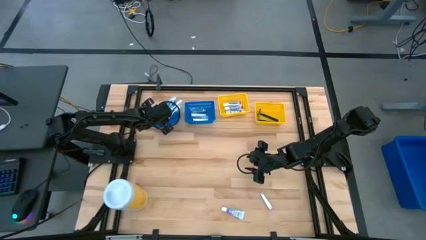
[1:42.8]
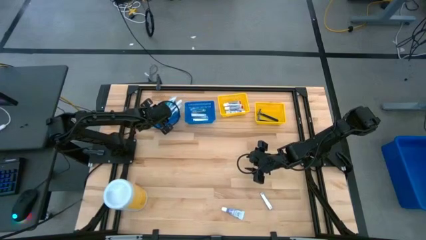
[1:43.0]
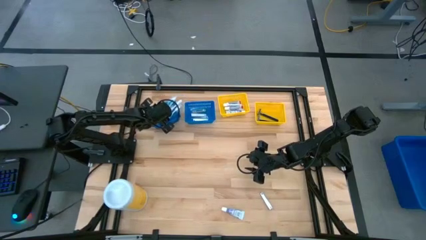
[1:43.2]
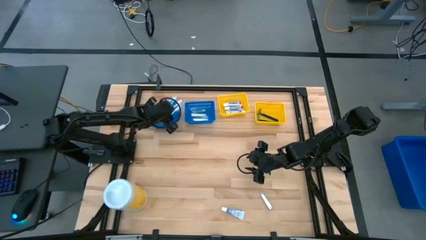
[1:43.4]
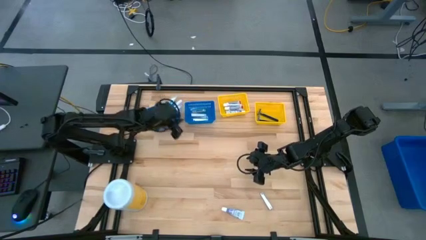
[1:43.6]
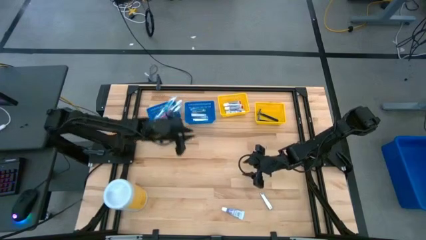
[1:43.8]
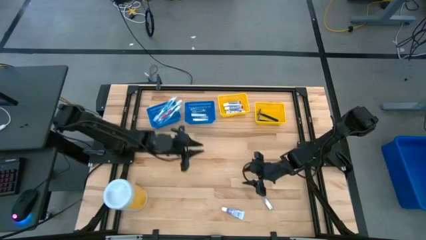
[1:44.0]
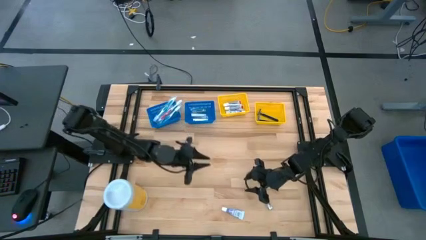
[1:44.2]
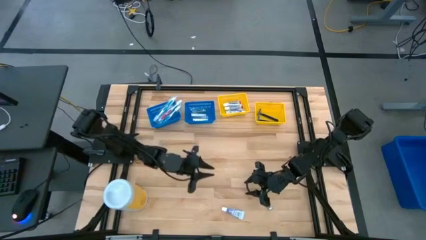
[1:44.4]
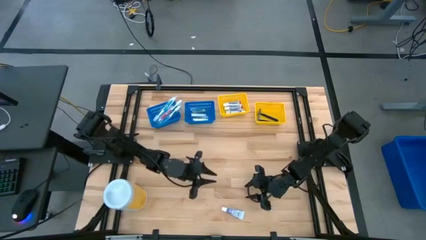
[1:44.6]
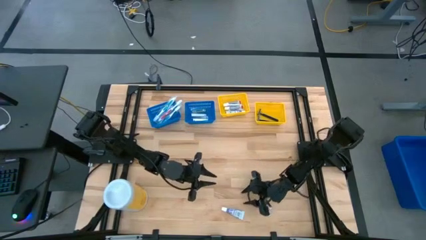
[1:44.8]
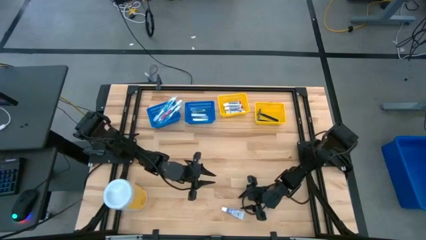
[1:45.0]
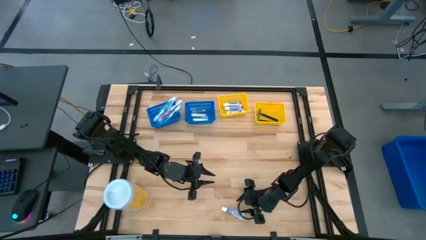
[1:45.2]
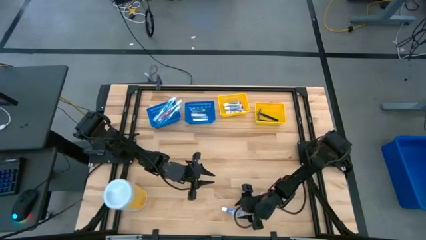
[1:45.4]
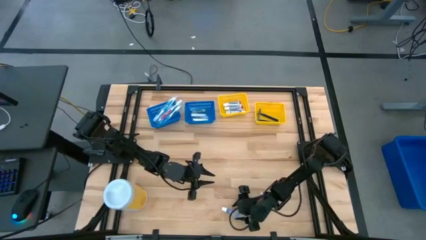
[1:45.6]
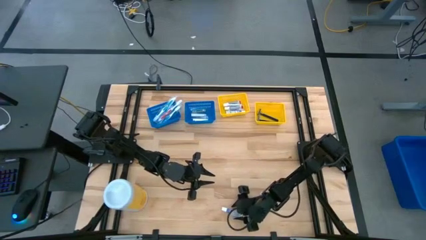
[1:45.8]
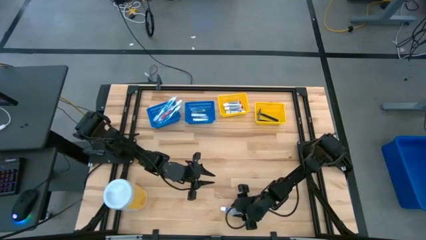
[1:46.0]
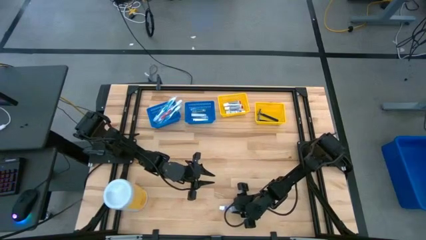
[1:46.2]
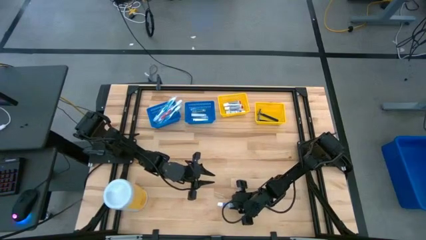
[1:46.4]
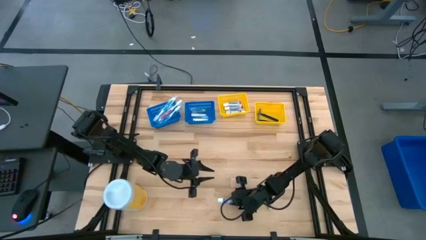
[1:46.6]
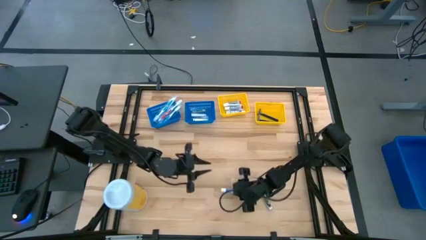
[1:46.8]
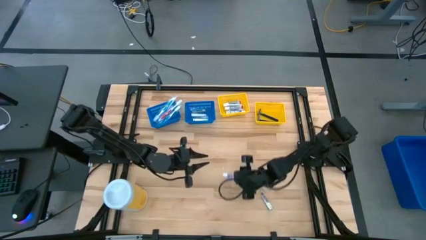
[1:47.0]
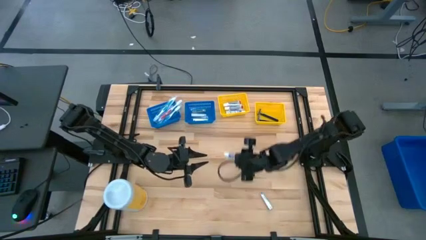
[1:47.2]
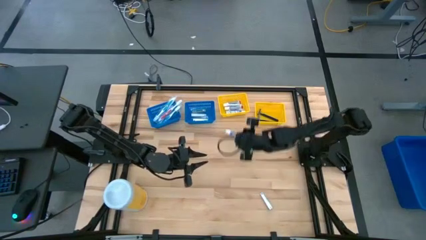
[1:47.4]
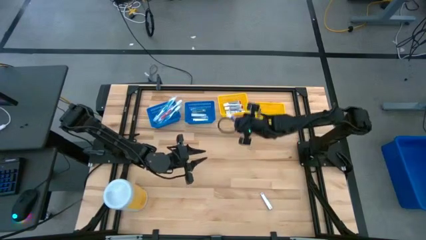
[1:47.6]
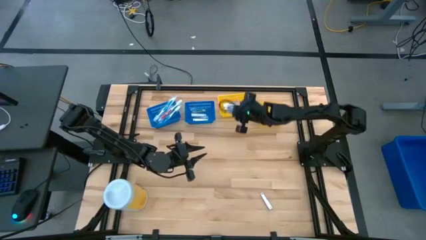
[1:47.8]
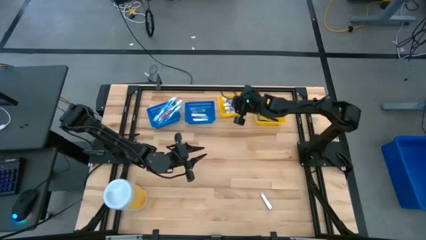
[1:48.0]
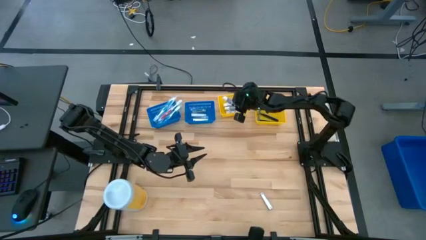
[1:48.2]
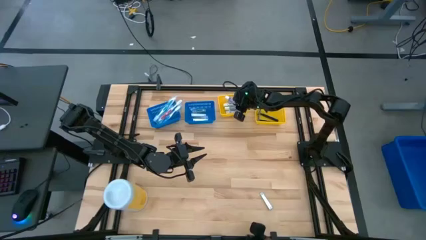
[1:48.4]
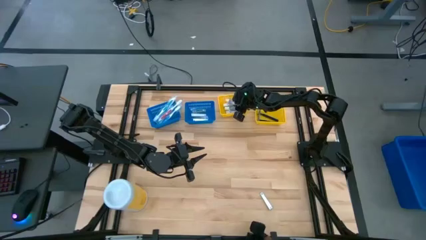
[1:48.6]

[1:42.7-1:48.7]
Task: Pick & Place Travel size toiletries
Put the white toothpaste into the left yellow bin

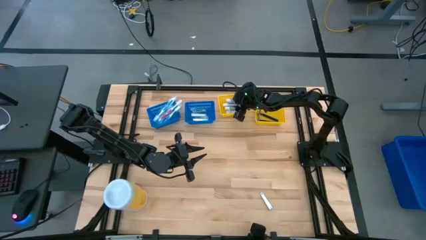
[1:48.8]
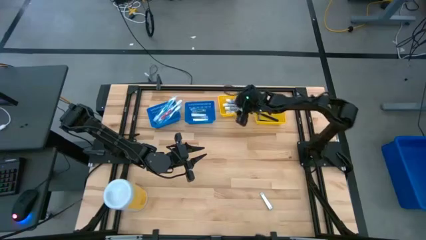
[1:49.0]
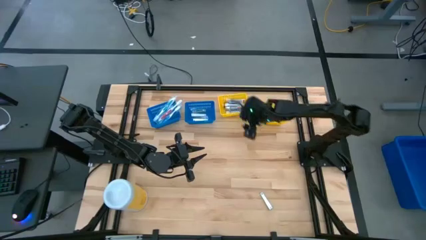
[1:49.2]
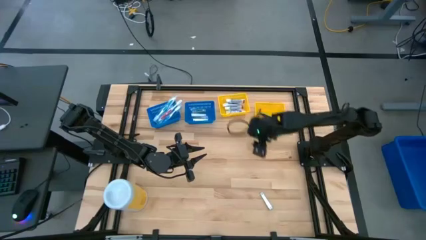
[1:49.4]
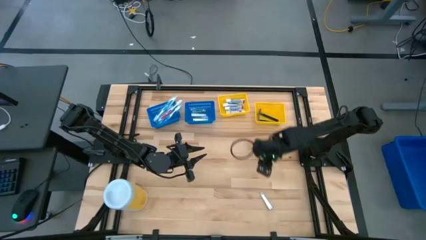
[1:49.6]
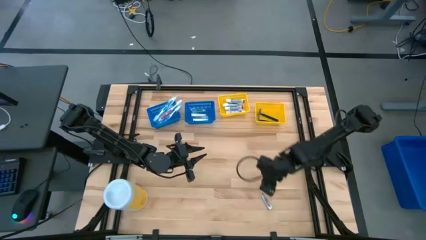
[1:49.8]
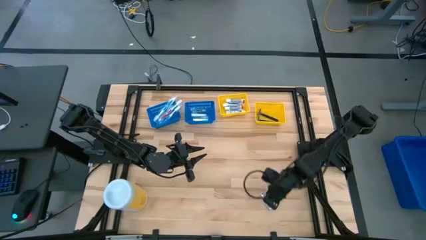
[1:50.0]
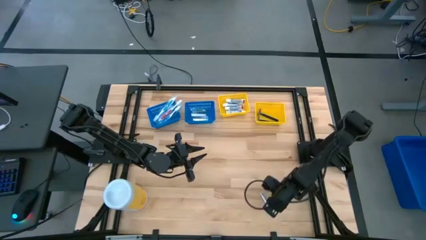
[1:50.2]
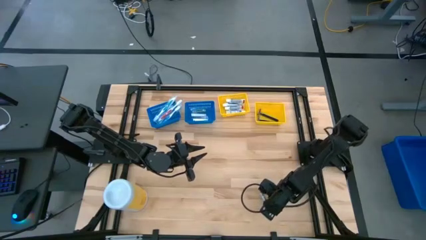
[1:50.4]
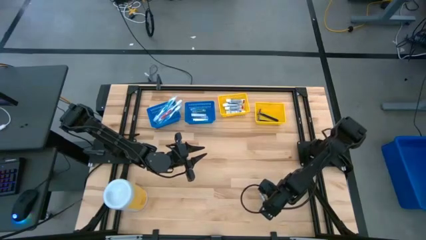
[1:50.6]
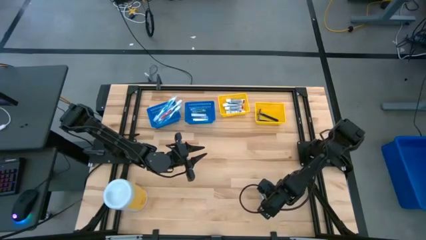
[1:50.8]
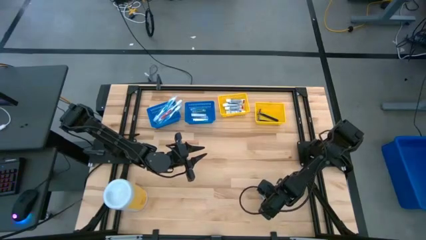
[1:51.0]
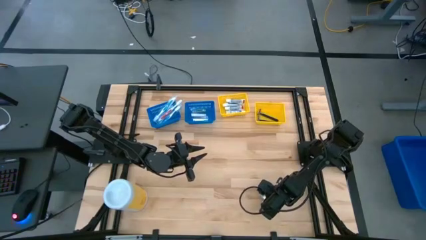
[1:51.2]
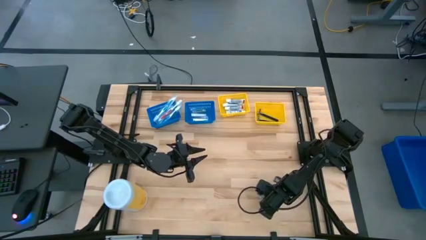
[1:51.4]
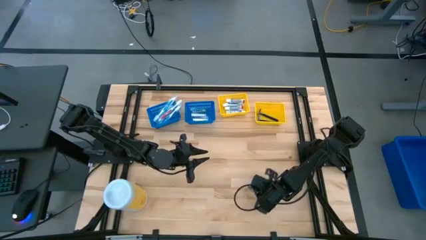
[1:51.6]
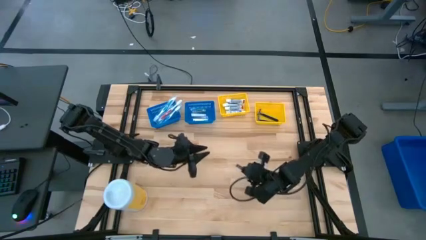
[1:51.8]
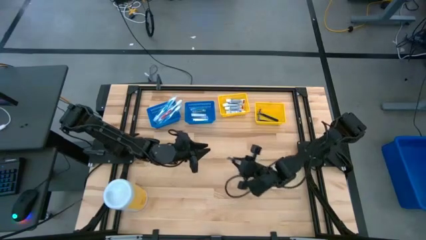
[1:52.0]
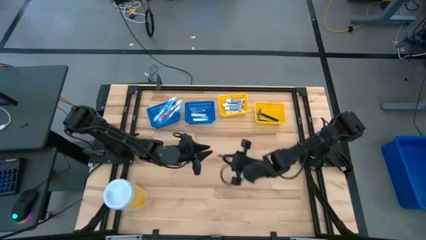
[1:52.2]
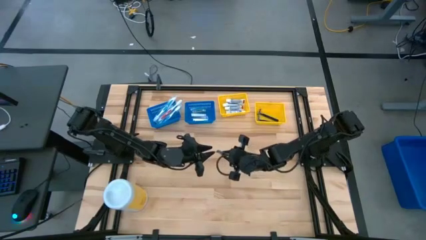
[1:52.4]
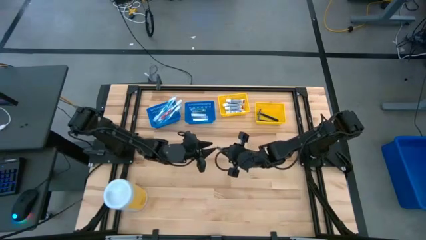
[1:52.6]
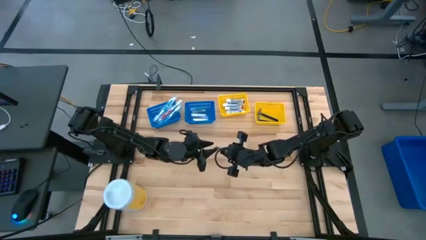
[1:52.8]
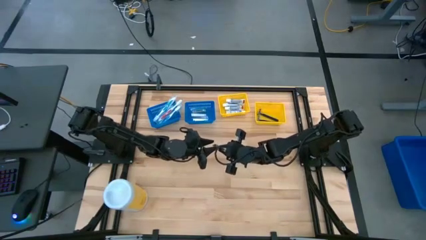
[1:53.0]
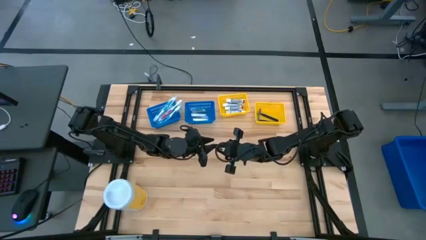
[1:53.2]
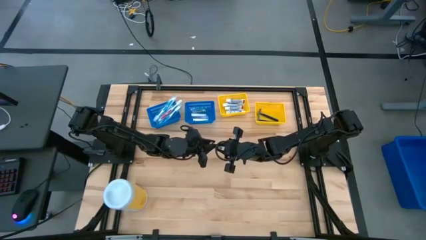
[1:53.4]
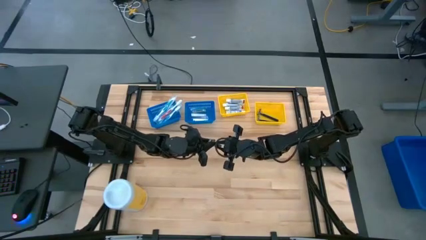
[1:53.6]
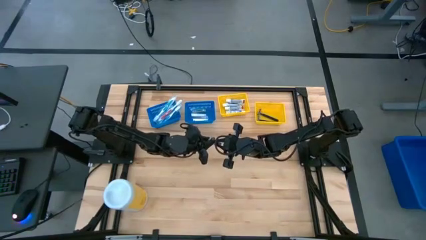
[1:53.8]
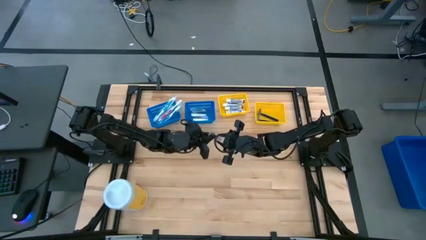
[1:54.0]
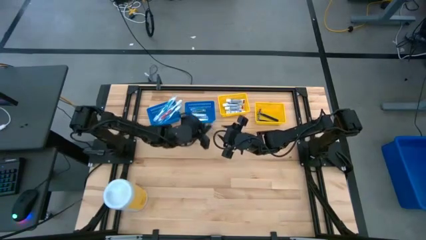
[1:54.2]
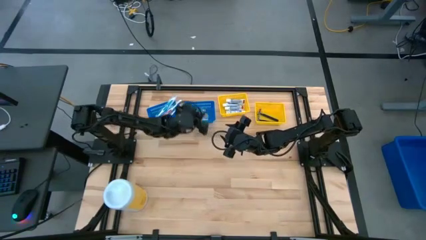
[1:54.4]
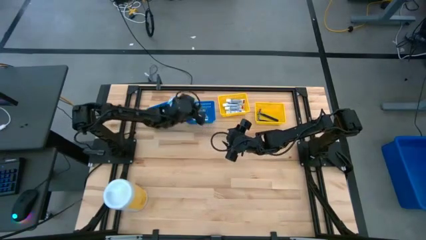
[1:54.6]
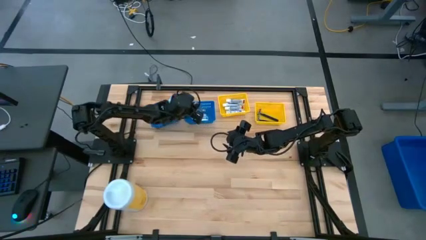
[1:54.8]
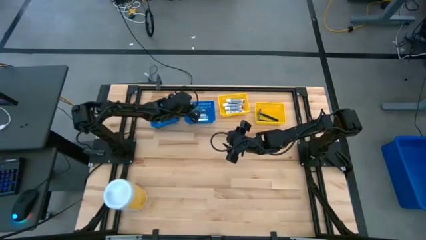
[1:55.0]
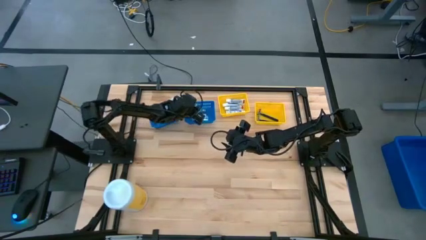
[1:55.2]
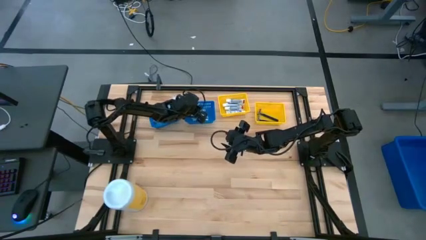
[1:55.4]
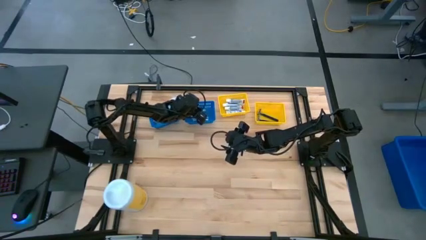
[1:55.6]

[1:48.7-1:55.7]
Put the silver nail cutter into the right blue bin

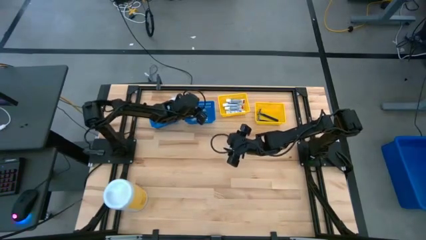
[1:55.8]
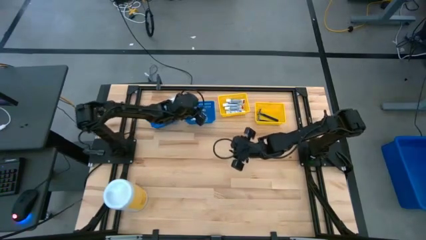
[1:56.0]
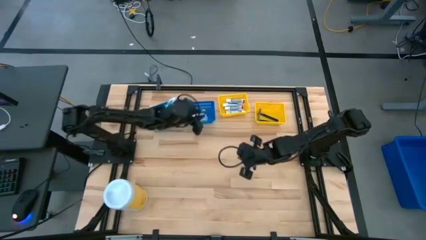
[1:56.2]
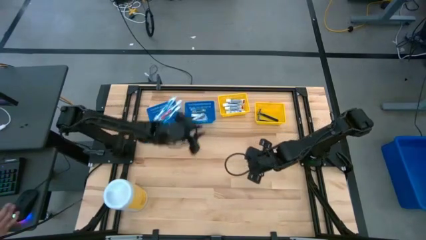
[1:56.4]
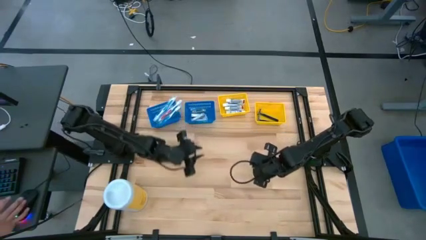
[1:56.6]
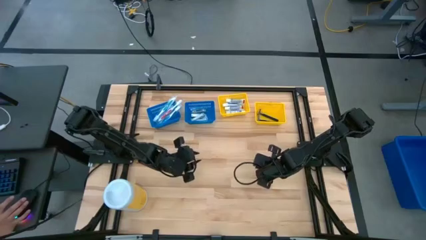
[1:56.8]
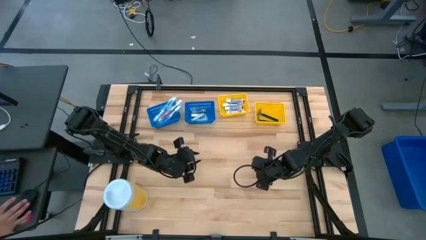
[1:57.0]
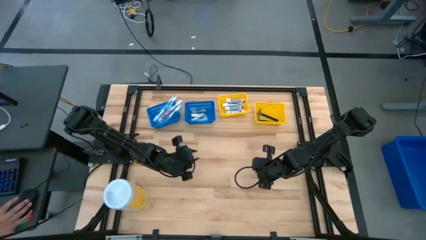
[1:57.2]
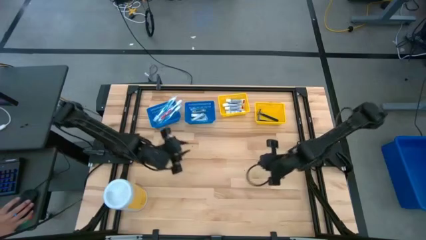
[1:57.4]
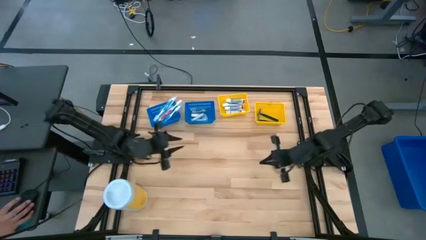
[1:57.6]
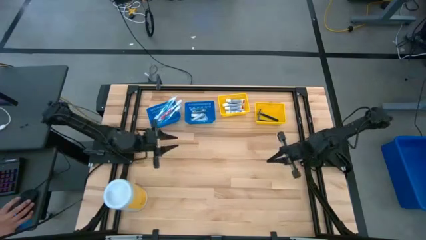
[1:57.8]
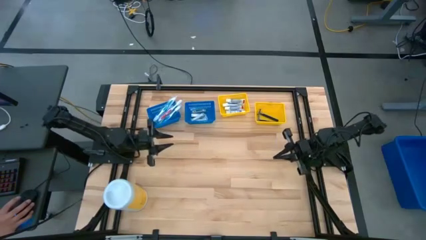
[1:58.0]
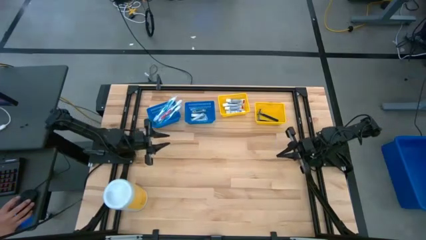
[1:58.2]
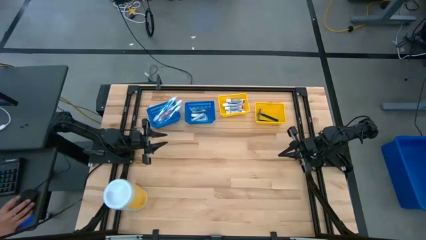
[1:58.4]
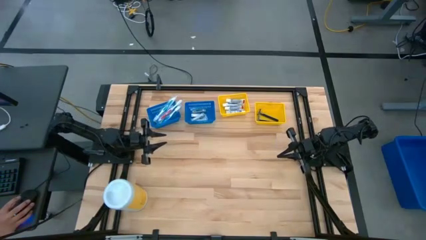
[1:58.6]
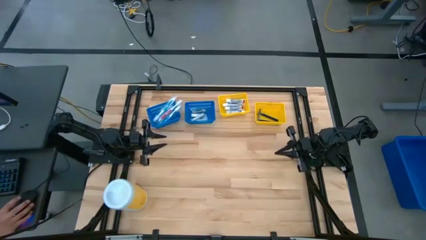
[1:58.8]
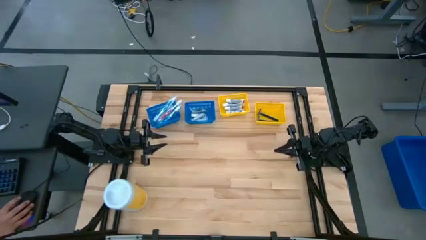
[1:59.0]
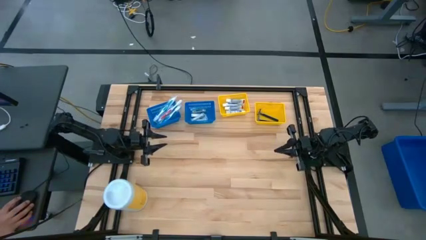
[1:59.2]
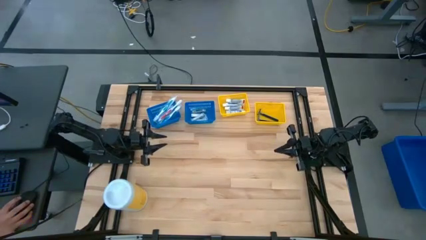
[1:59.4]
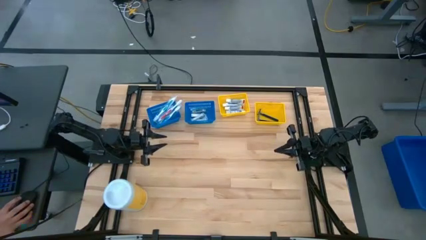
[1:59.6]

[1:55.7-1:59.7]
Return to Home Position
